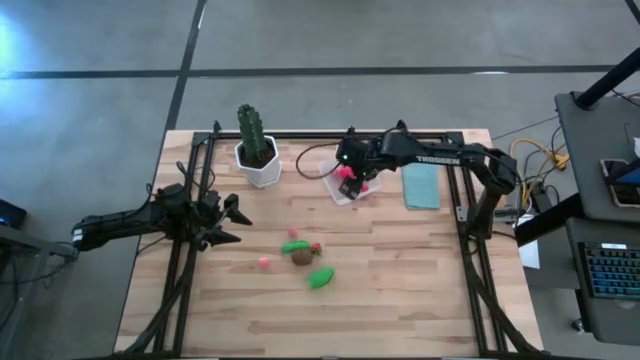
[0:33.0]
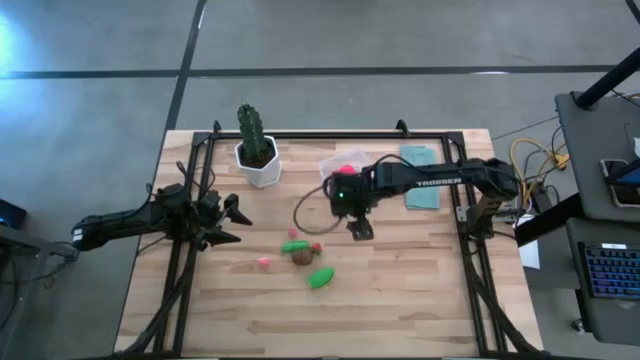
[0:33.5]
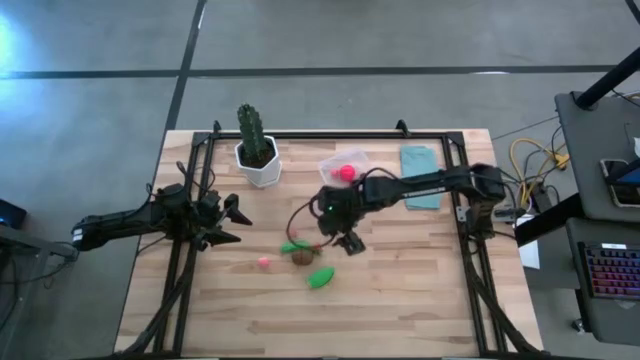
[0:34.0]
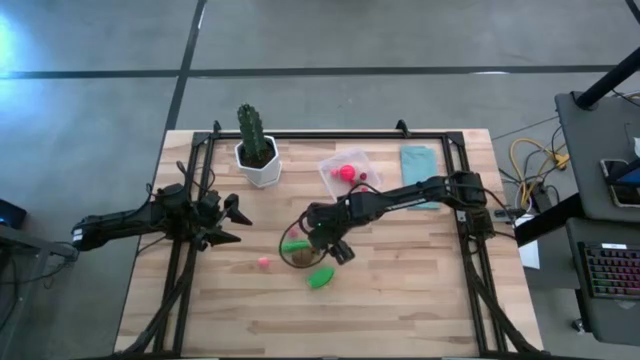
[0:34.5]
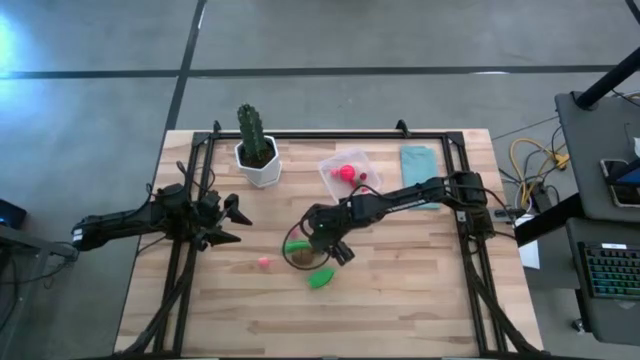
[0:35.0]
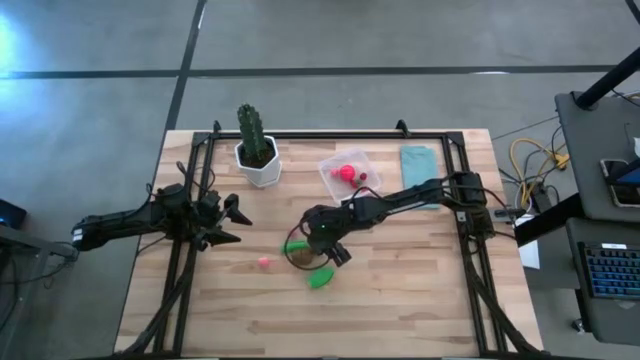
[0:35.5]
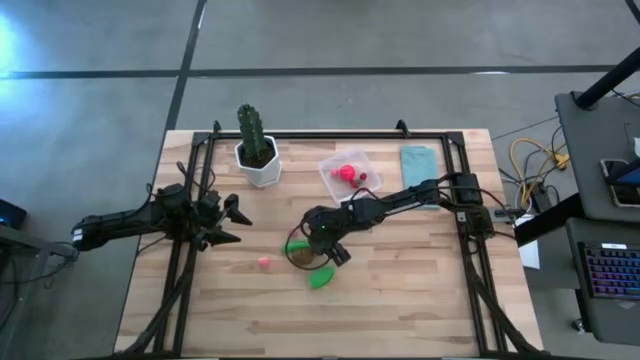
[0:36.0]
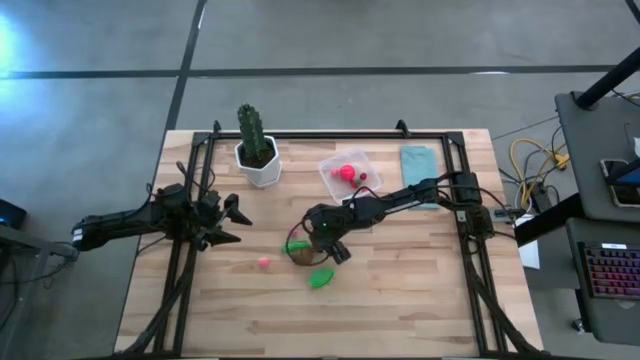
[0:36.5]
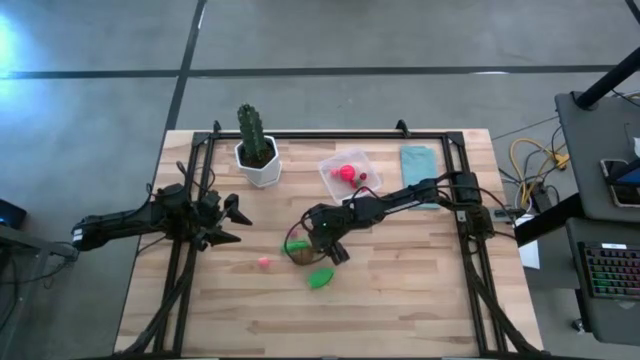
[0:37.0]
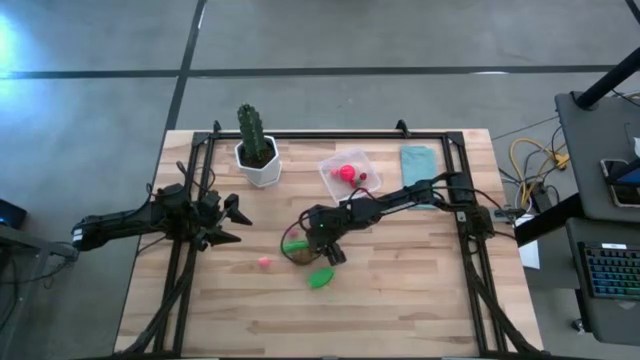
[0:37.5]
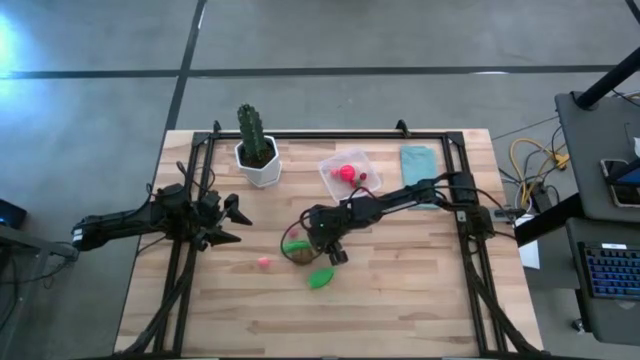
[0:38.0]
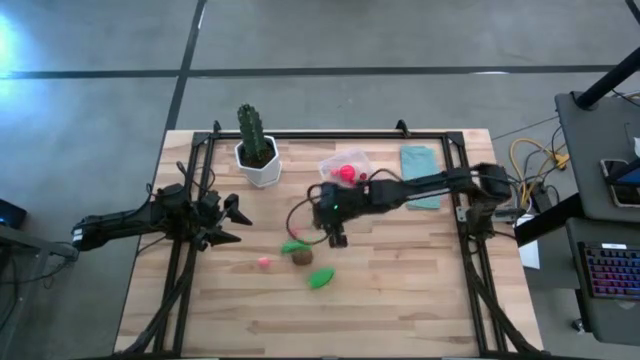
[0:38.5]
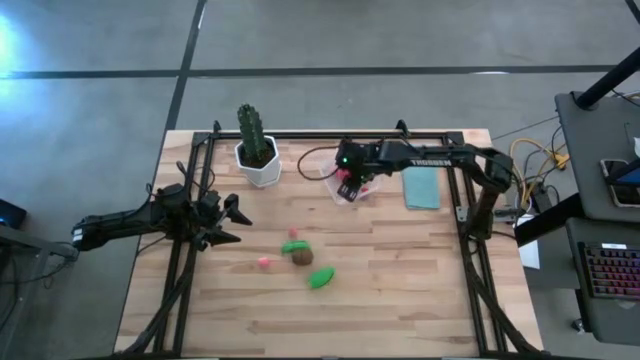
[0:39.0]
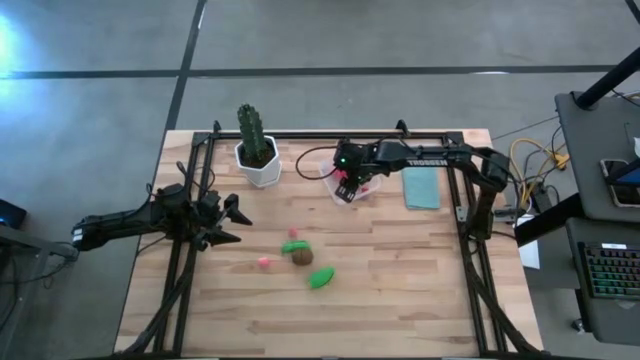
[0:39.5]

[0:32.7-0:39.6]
Task: Pick and placing Produce into tupperware
Put the strawberry into the transparent bin

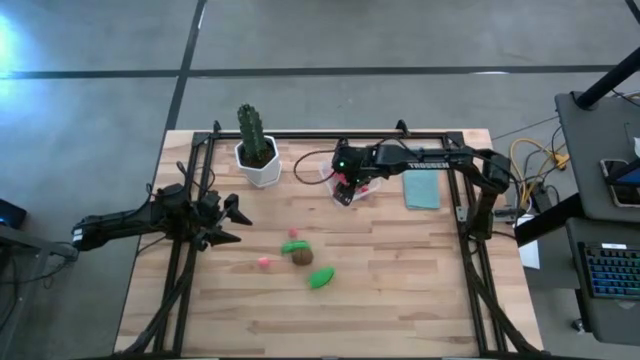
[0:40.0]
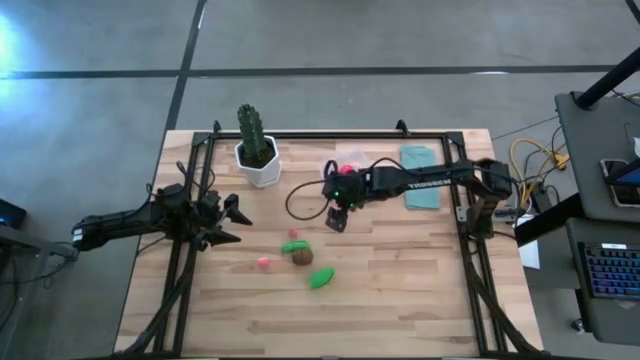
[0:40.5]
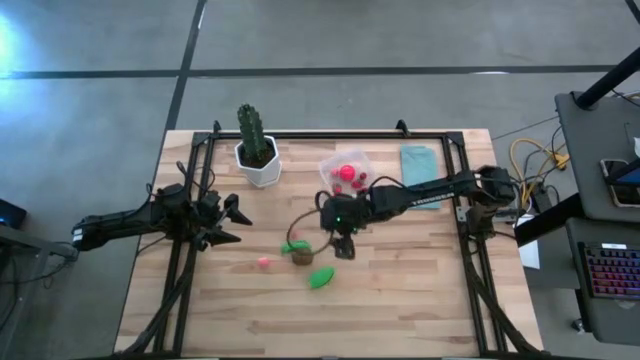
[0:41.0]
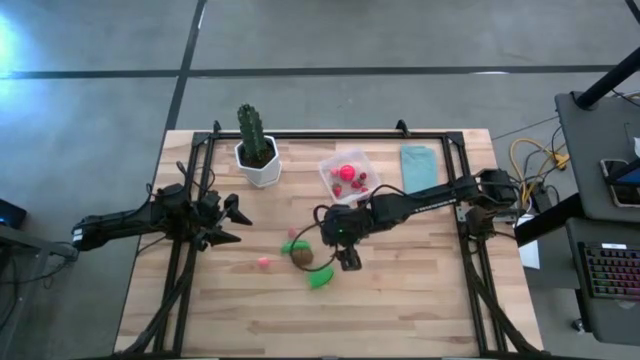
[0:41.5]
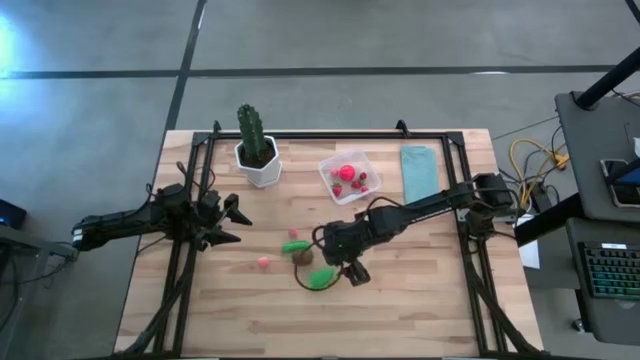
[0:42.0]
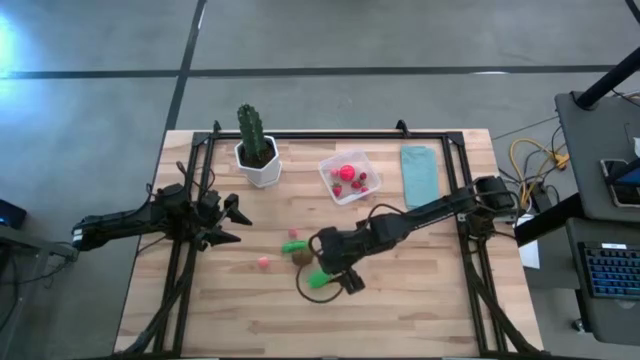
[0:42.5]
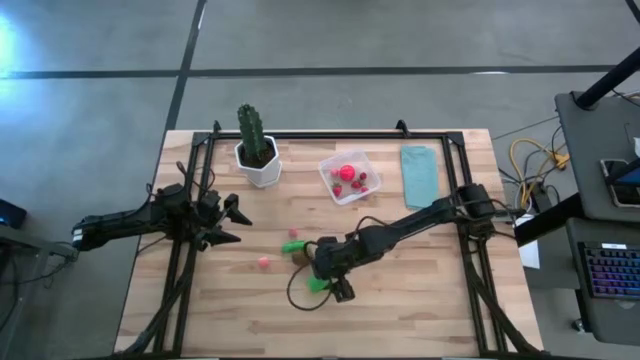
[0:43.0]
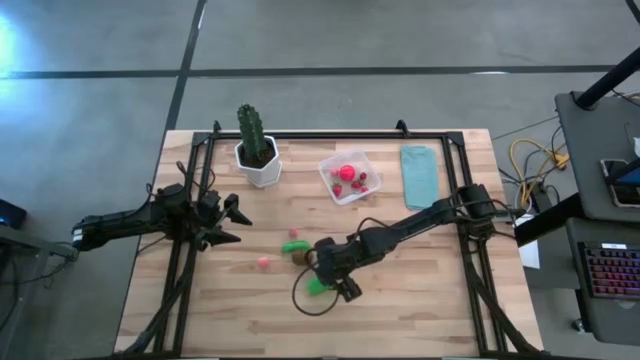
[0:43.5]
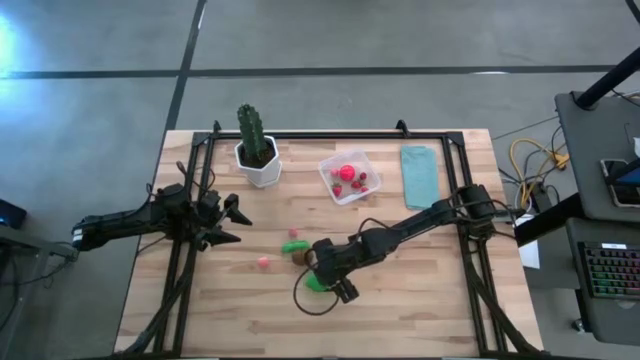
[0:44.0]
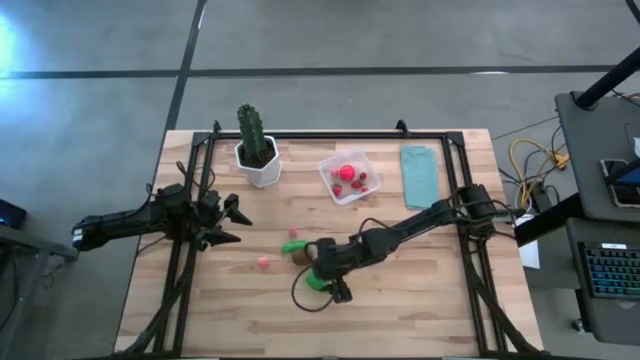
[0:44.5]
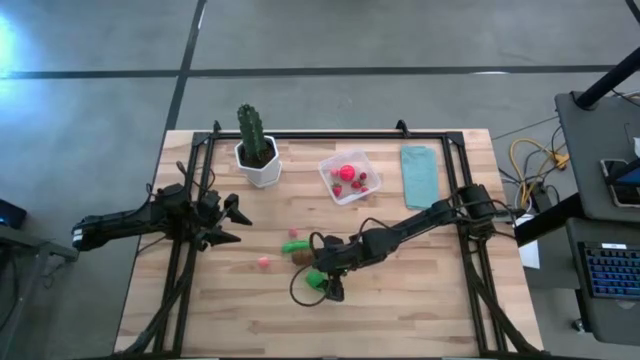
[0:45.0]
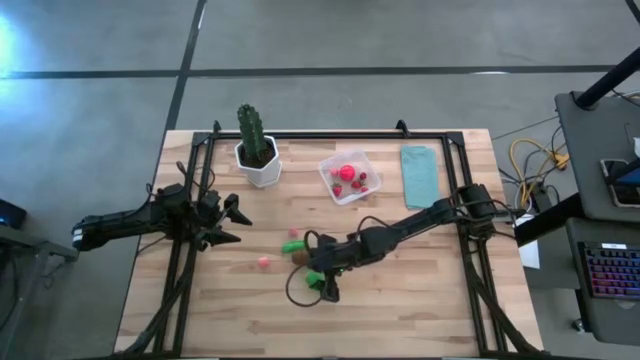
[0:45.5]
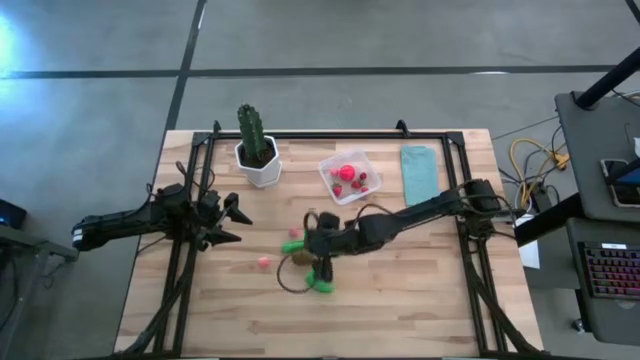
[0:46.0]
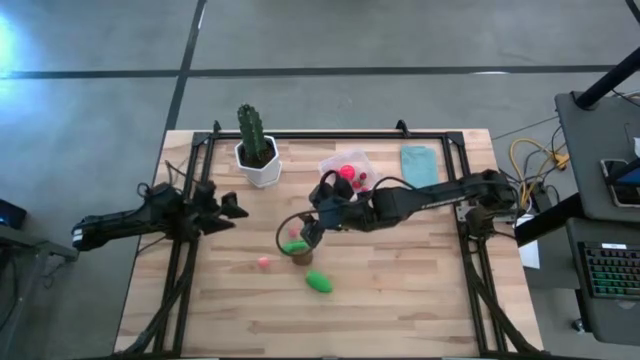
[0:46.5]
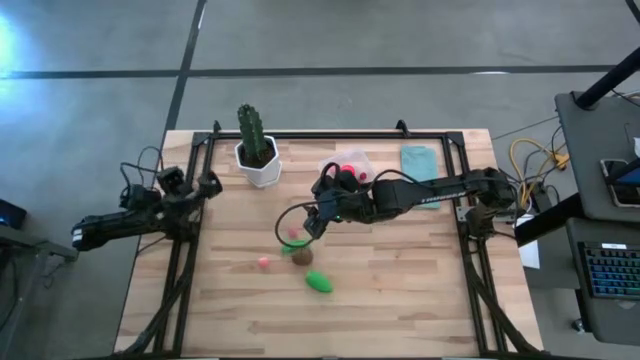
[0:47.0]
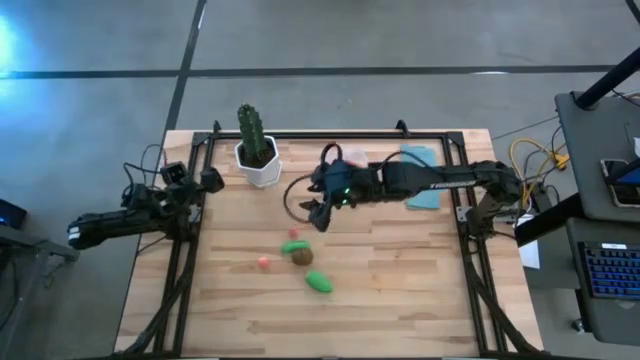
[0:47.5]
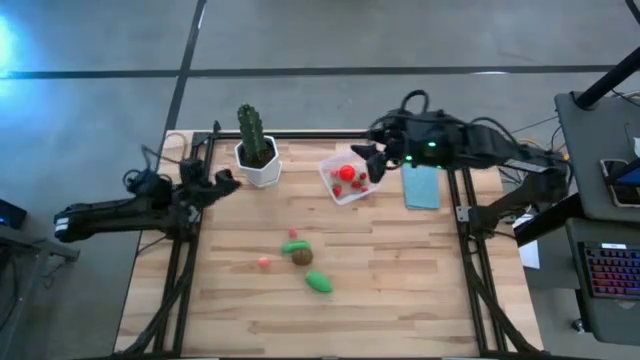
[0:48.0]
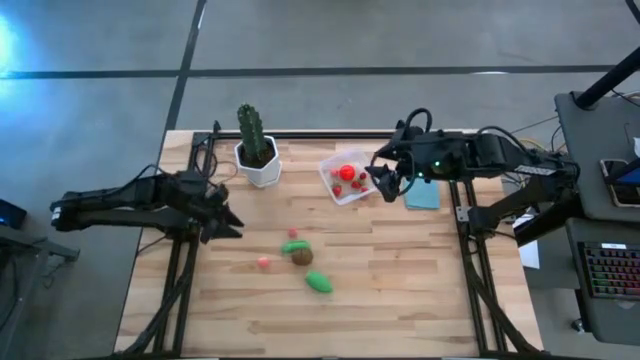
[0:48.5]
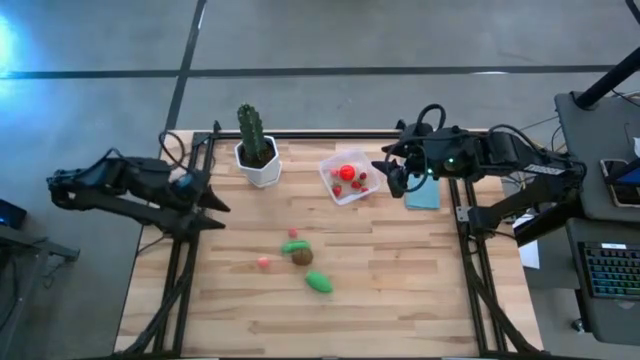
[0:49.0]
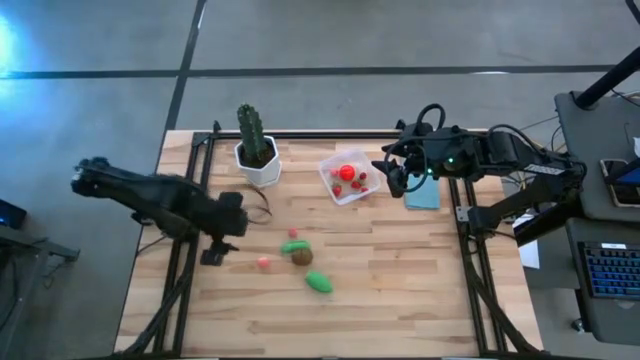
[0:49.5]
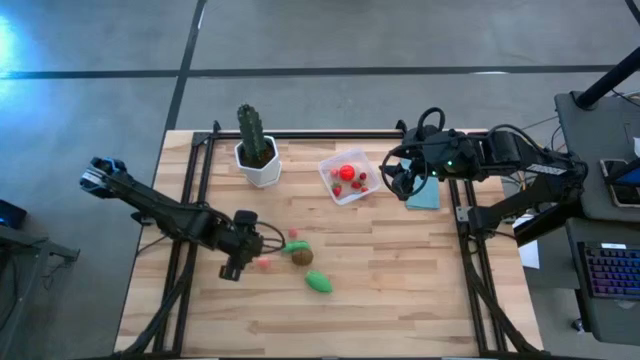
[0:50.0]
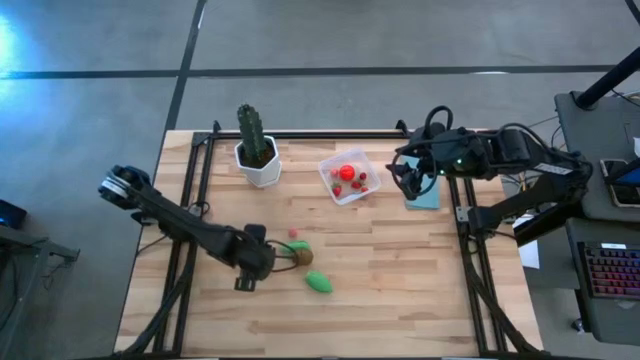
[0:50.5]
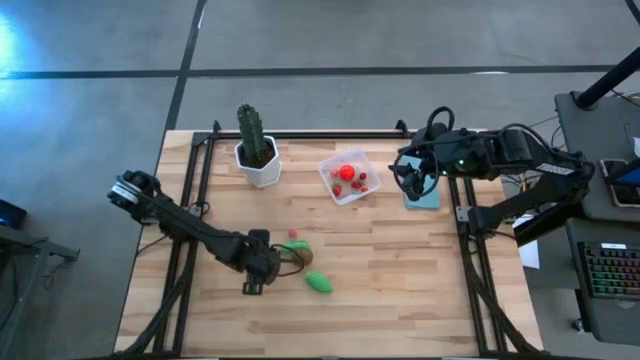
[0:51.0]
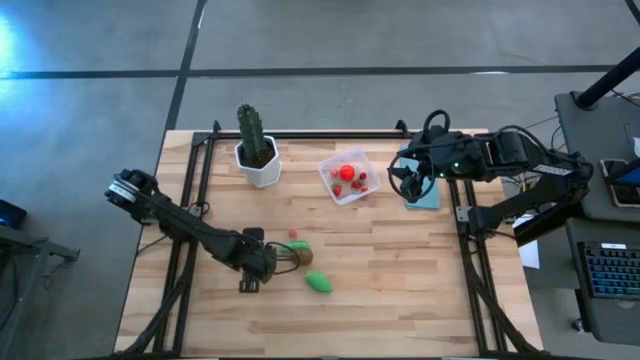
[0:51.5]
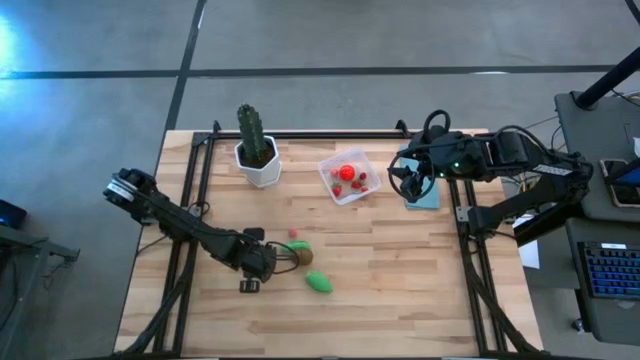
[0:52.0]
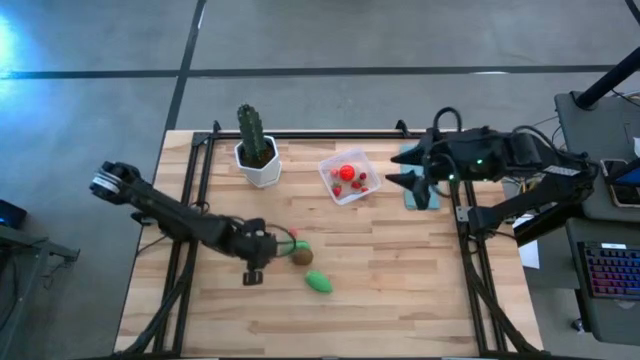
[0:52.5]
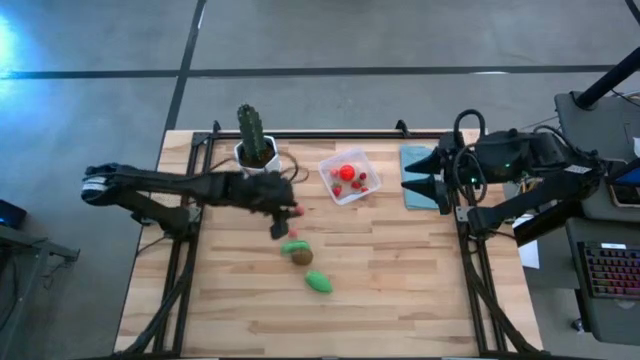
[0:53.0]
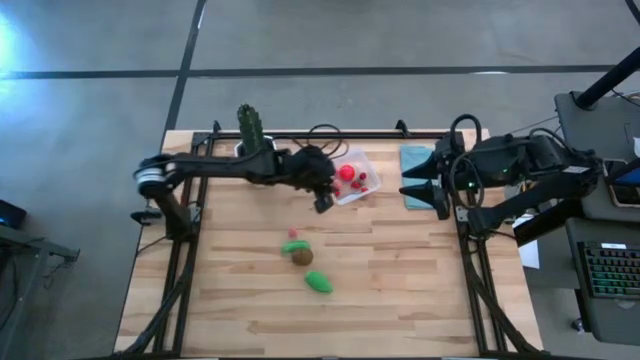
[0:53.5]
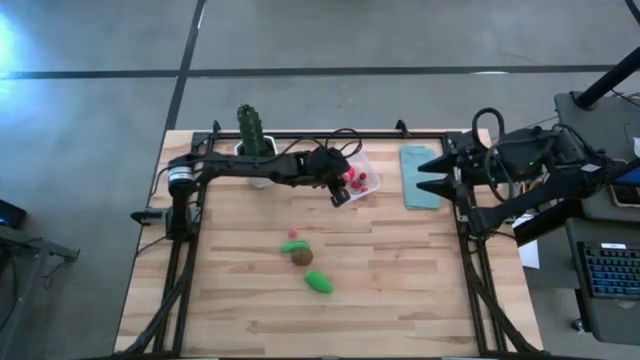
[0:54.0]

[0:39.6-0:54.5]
Put the bottom peach into the transparent bin

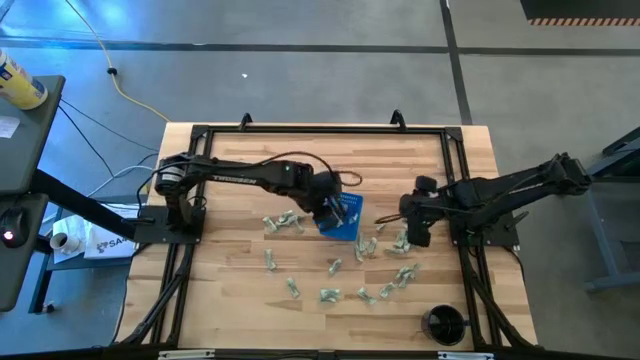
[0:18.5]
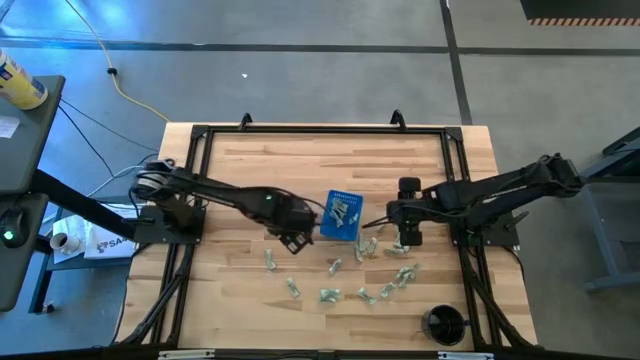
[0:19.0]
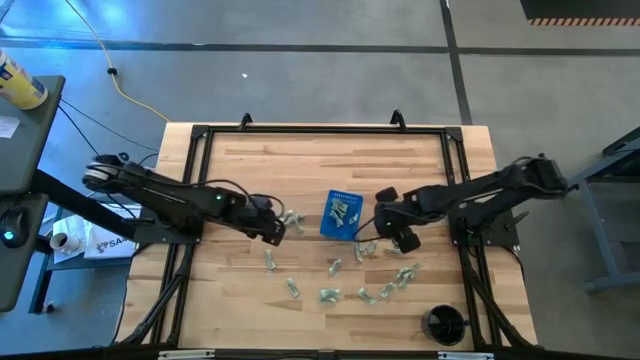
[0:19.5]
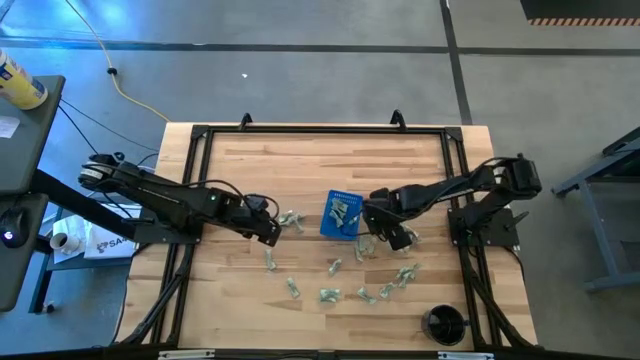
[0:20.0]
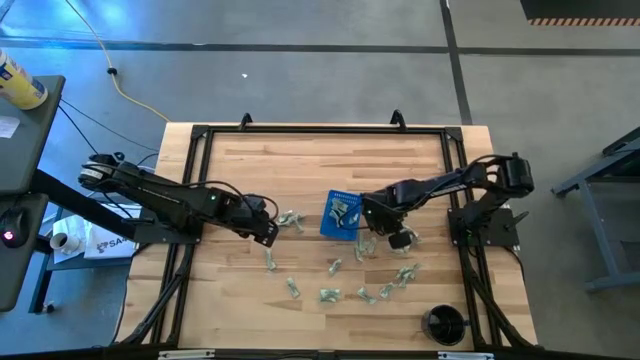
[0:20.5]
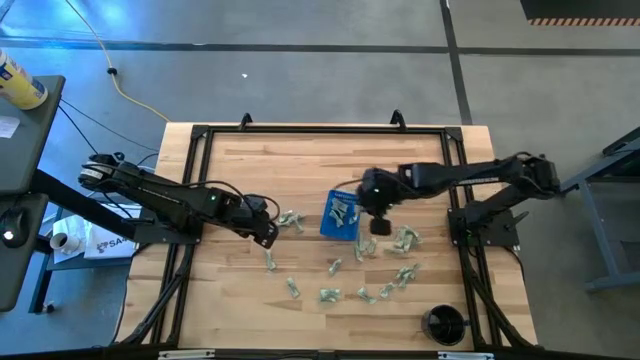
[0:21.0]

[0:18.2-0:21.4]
Task: Pick and place Stevia / Truvia into bins
Put the stevia packet into the blue basket
